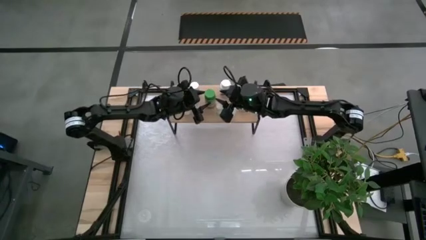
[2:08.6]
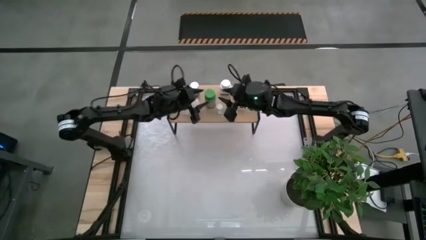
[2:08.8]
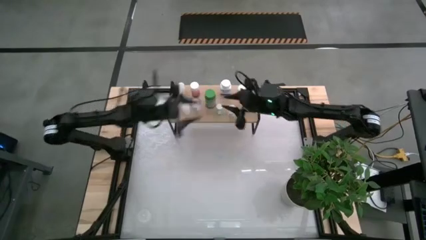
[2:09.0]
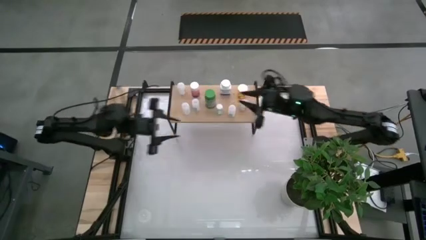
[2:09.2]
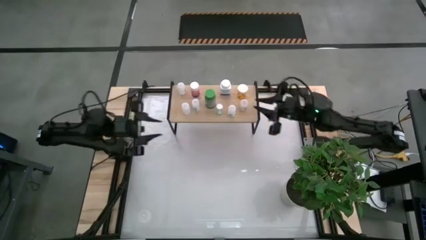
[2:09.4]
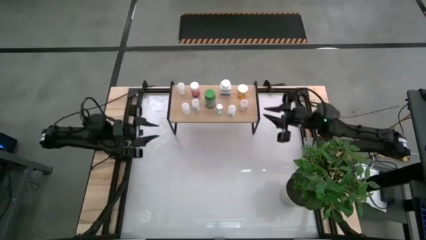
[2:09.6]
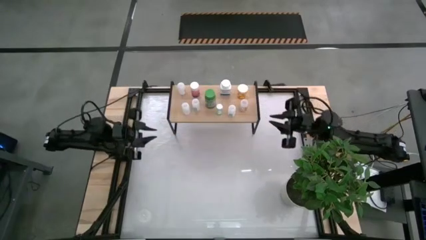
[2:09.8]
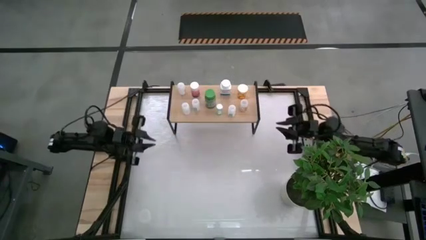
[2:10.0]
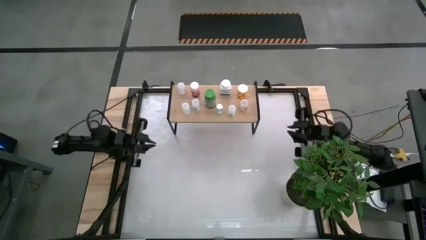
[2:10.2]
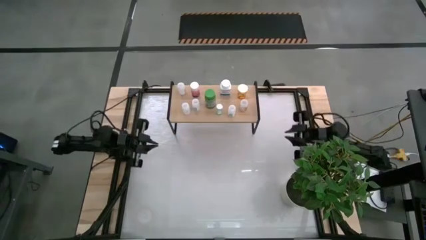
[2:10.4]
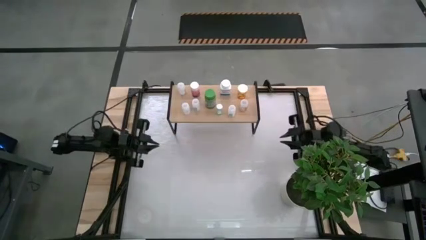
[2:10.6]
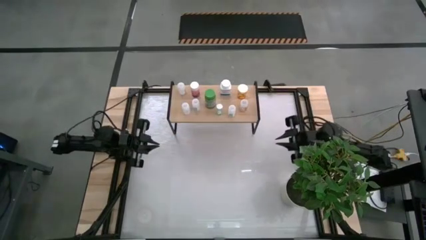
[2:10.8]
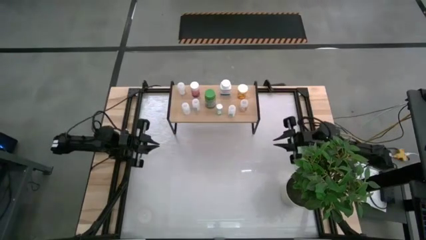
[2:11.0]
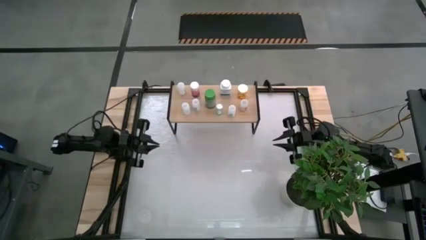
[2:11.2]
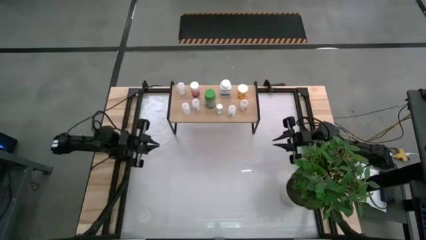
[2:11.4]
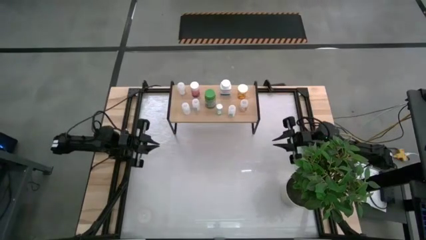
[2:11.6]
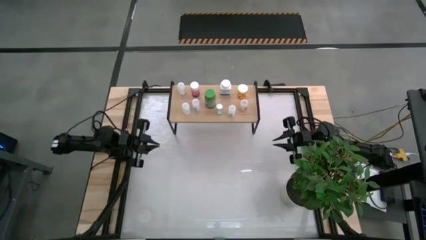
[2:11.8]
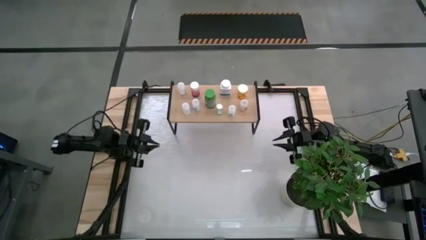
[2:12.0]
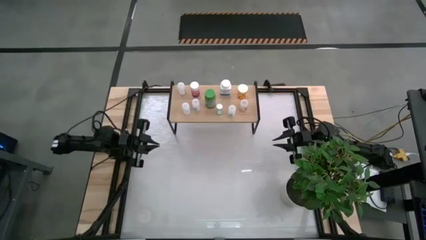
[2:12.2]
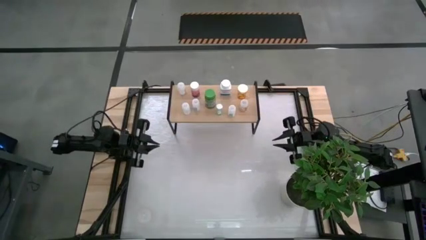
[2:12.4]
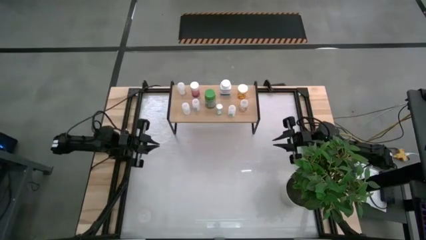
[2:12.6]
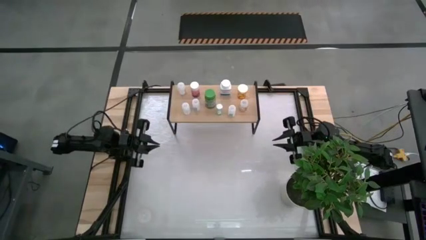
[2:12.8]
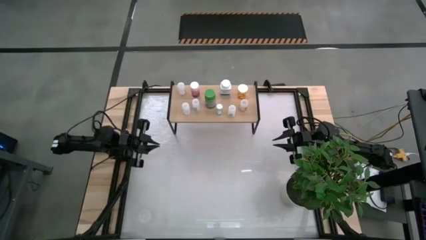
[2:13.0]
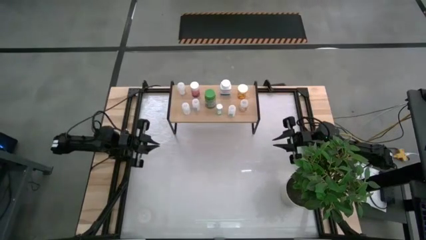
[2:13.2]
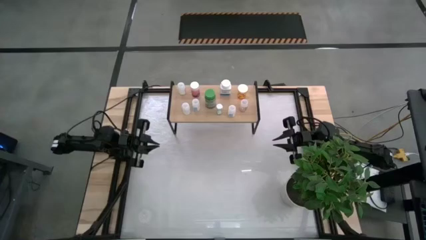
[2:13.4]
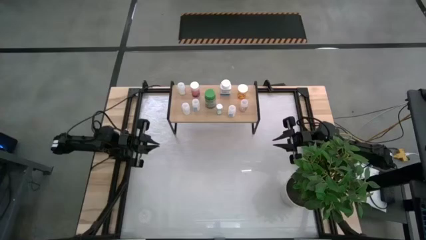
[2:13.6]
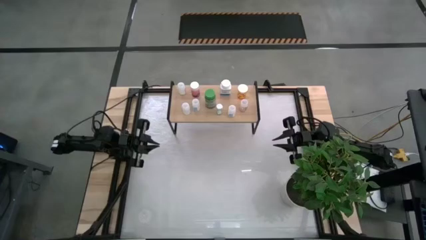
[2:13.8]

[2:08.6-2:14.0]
Task: Pick and place medicine bottles onto shelf by color
Return to Home Position

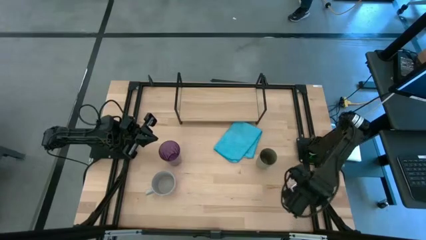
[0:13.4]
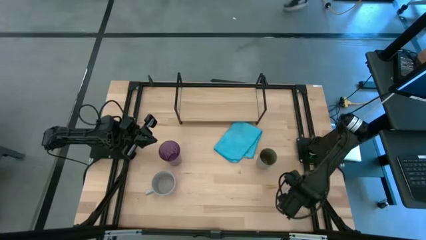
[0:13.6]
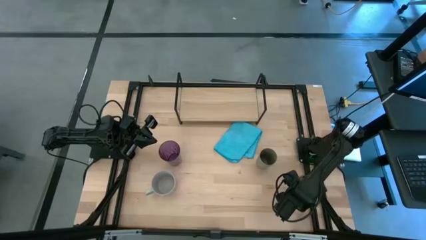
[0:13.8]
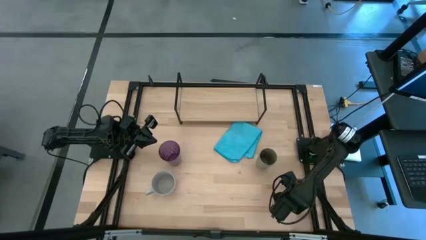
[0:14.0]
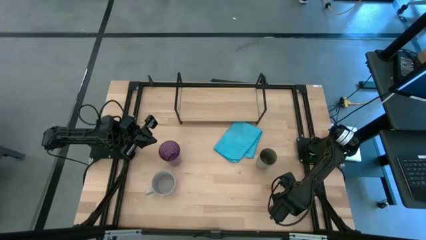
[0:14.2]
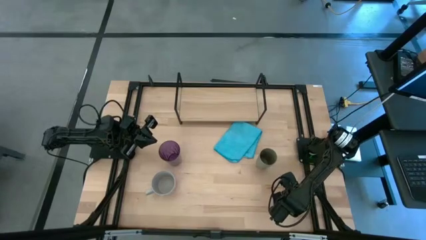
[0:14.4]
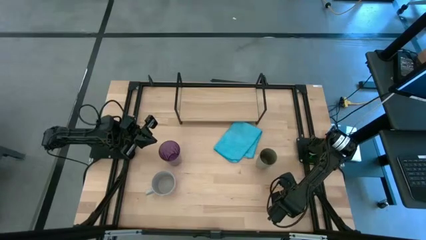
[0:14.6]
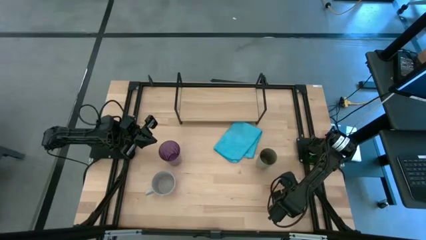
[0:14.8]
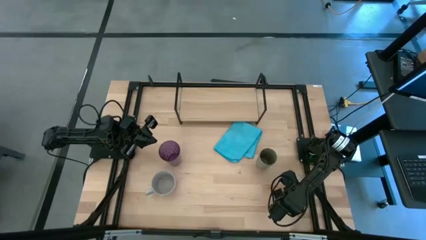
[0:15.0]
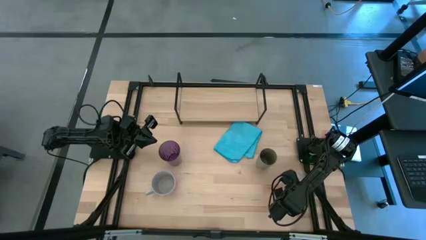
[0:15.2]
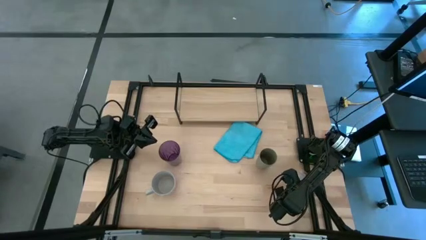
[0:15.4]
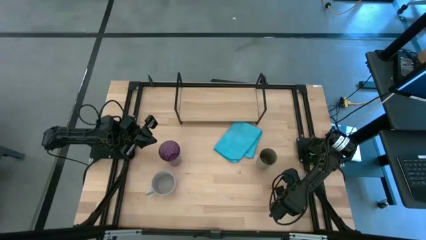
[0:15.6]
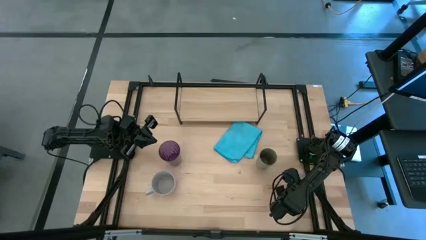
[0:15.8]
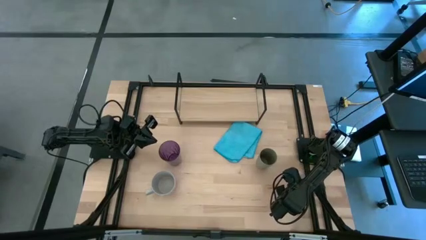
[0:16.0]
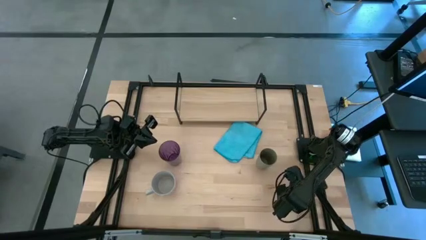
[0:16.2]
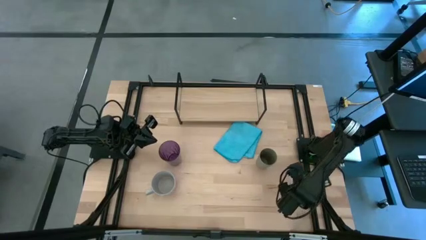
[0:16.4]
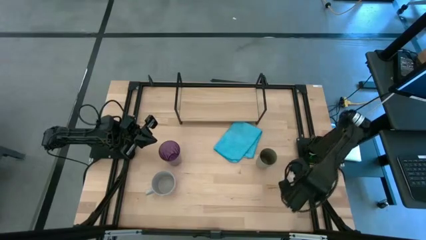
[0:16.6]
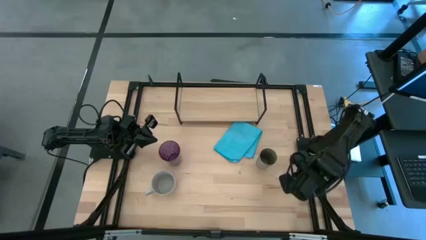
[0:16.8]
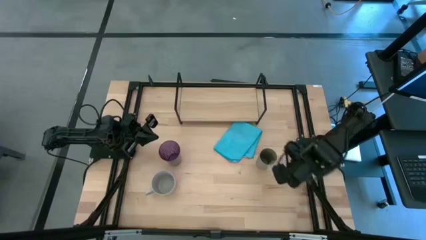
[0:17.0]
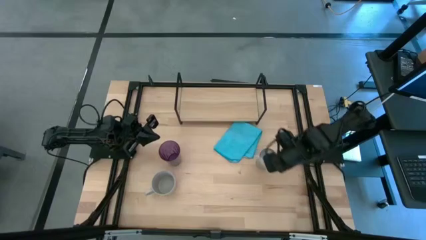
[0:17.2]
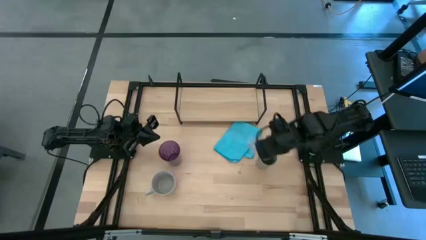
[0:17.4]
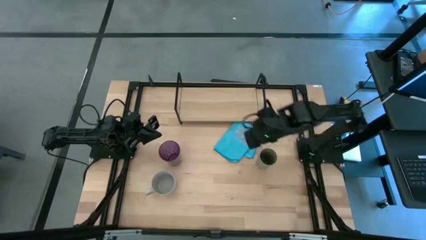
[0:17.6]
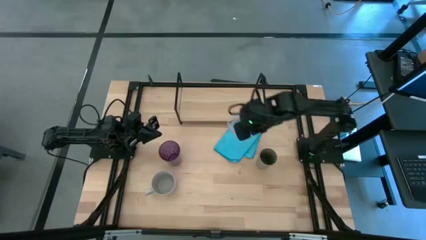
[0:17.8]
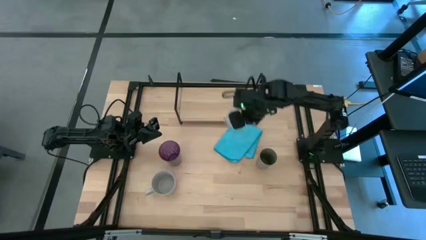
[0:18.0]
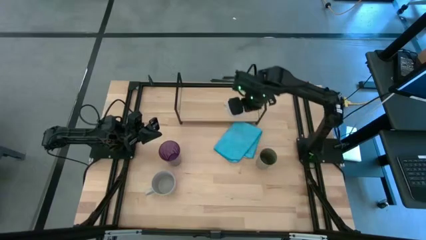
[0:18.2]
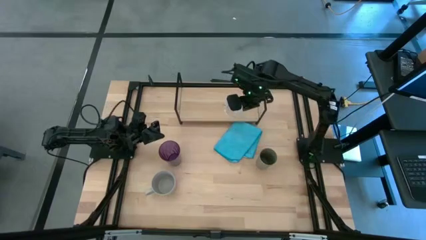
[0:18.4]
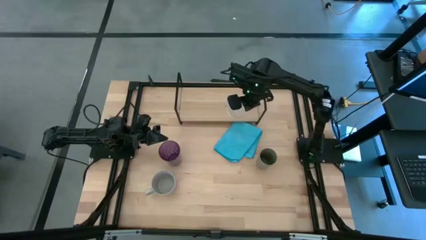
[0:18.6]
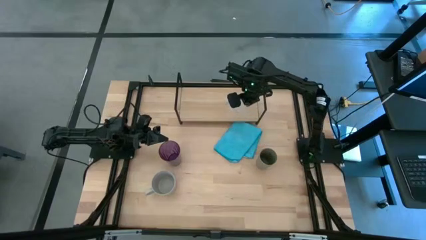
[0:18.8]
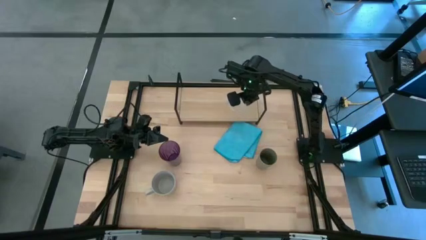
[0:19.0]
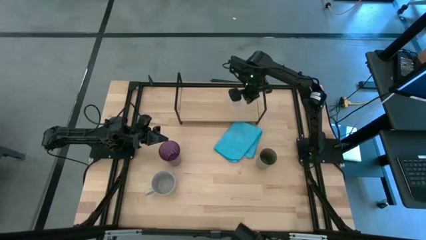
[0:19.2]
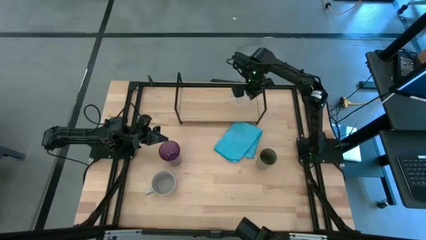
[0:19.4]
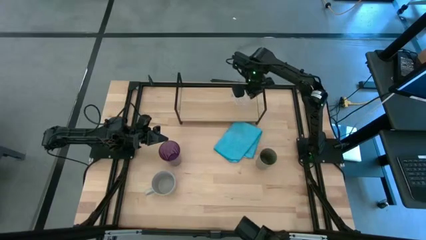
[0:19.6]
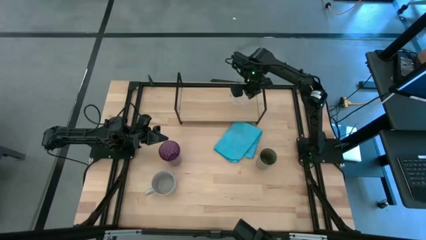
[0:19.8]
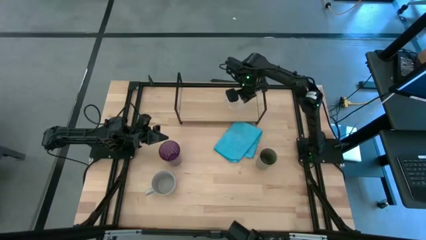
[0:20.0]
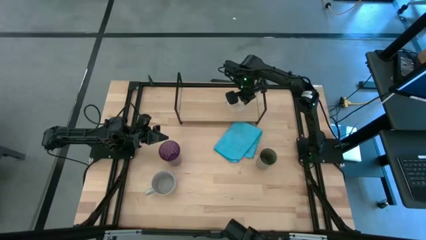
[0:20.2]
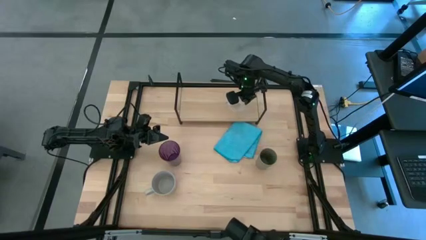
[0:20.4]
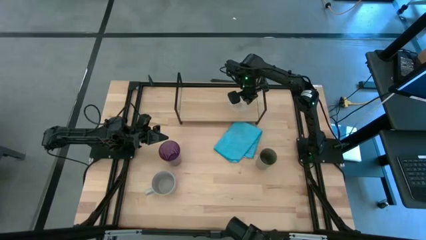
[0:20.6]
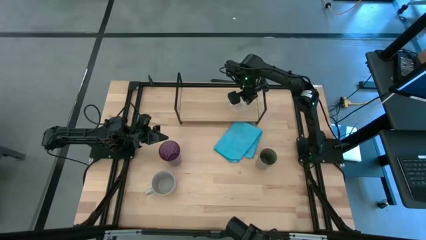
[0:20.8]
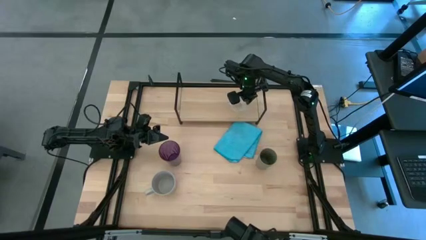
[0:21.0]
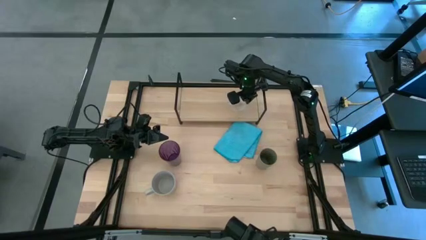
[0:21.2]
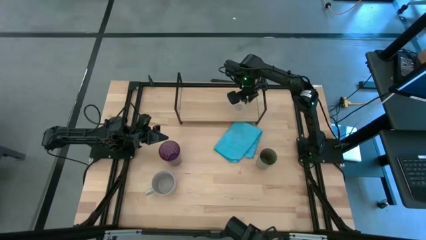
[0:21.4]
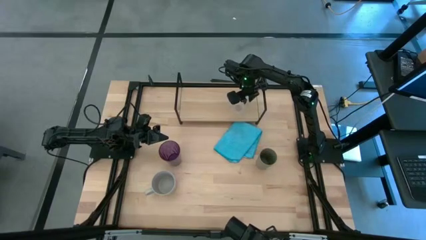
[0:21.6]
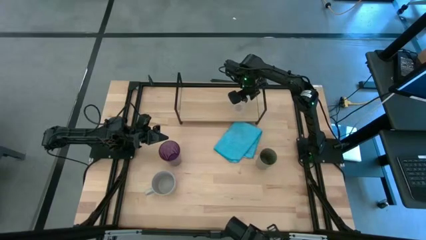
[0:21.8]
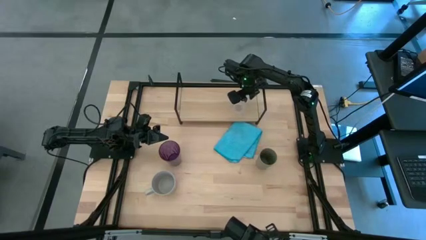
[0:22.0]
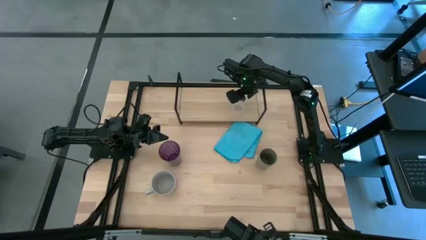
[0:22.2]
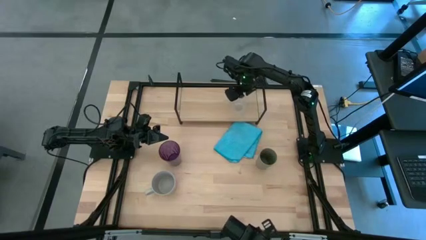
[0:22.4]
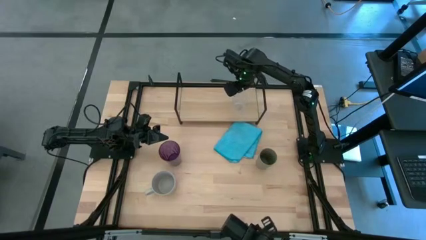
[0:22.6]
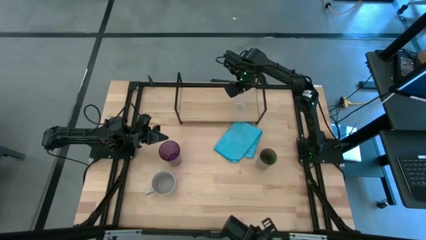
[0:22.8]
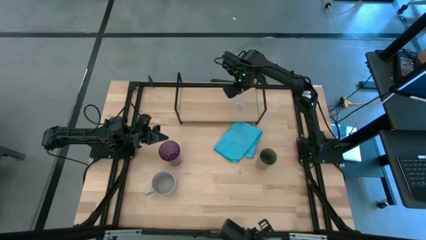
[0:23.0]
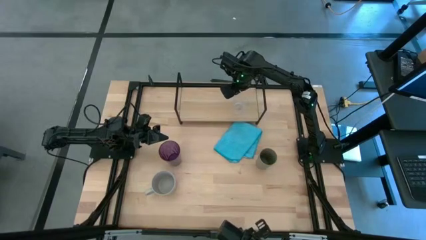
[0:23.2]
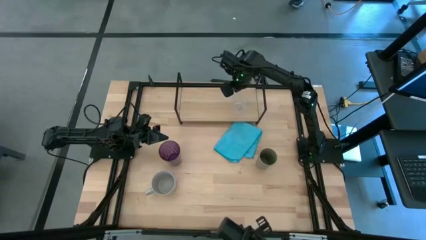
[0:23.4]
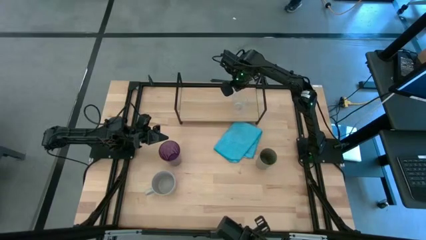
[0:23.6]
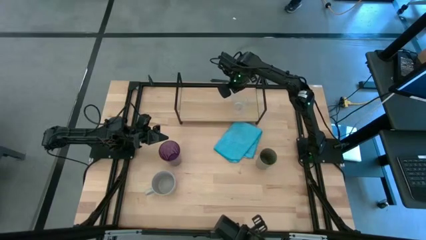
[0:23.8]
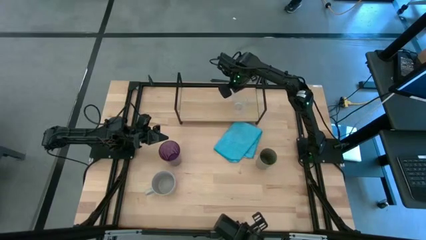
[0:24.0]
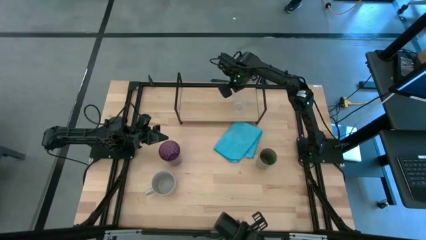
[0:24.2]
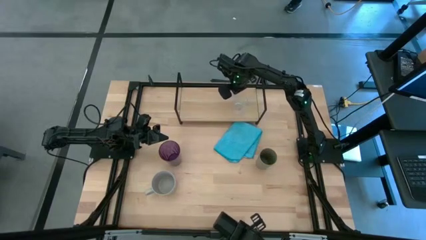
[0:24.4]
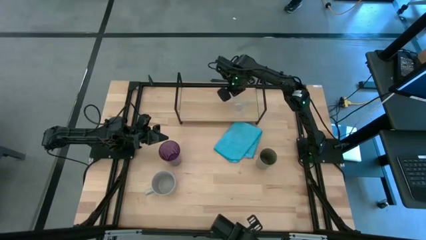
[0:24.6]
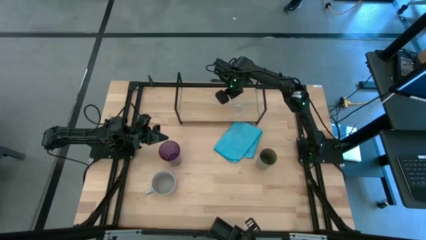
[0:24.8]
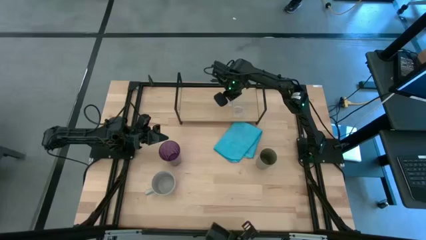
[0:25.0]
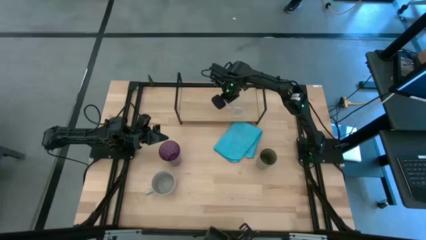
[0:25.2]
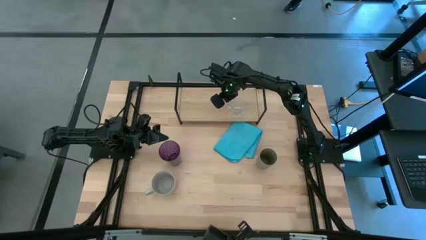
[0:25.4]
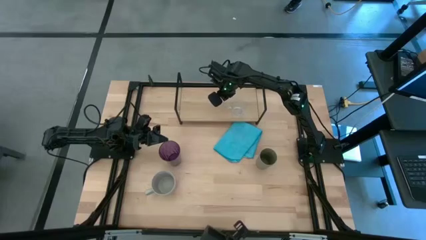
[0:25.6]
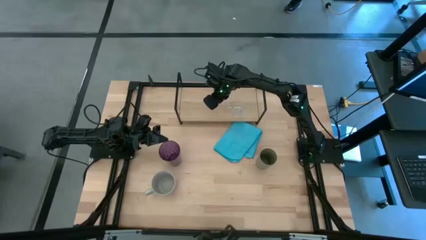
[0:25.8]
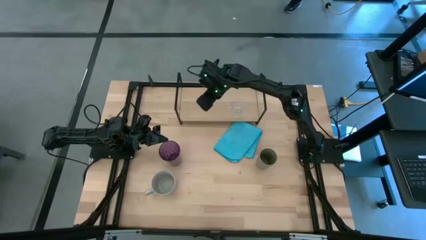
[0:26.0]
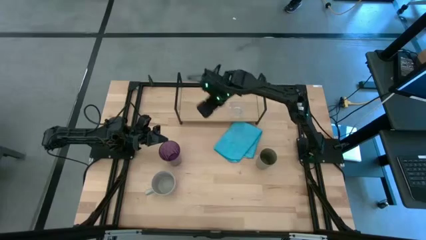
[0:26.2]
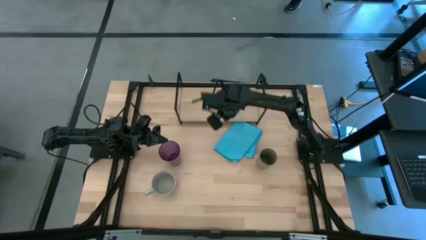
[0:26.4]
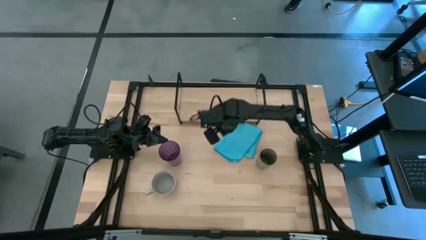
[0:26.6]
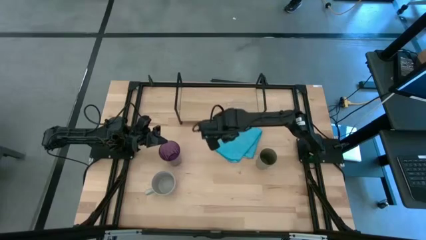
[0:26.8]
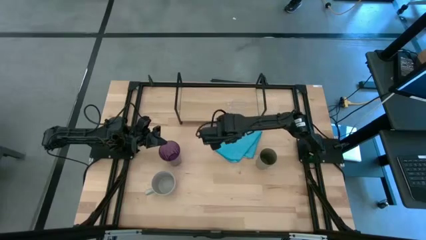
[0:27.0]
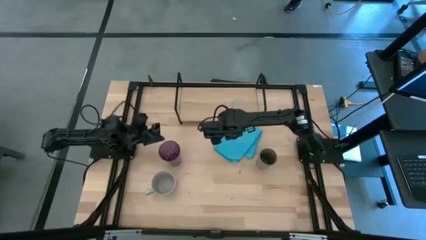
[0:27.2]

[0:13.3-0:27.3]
Task: Stack small to large cups/mugs on shelf
Put the transparent mug on the shelf
